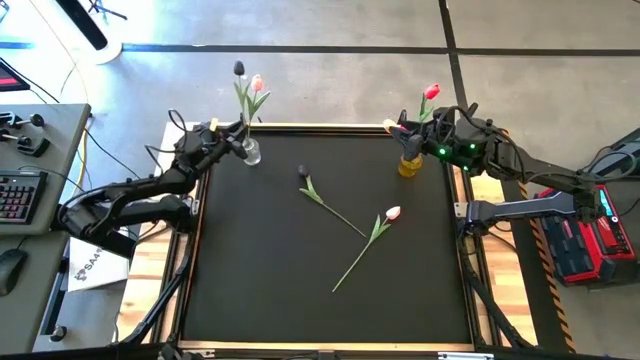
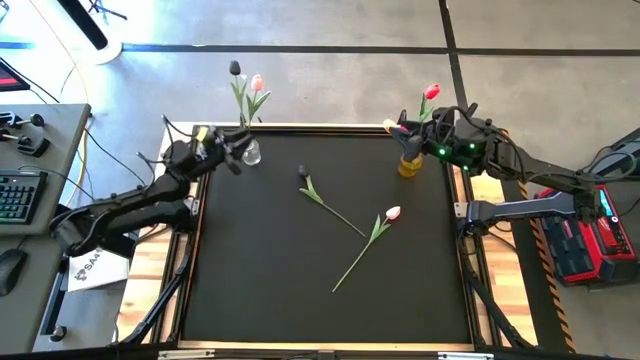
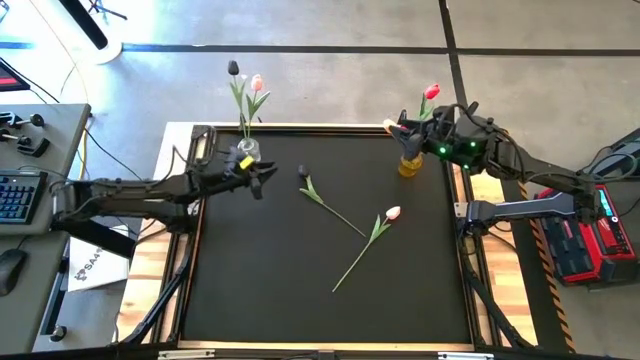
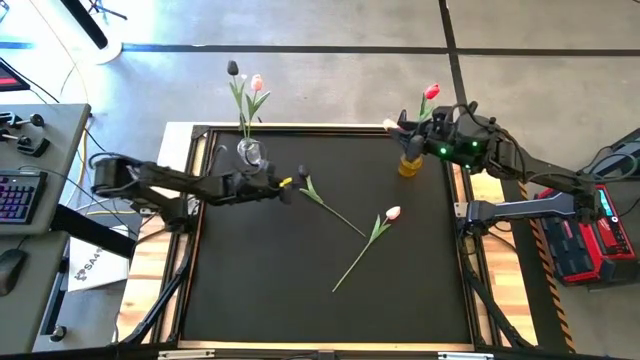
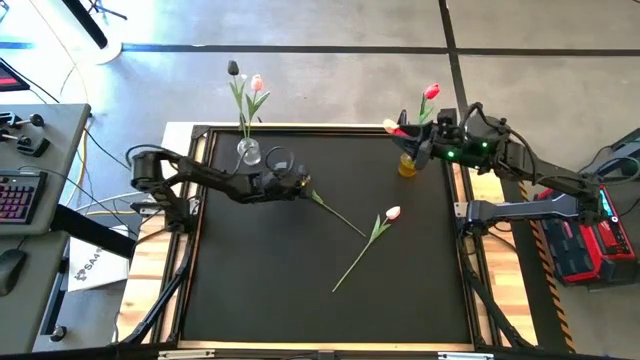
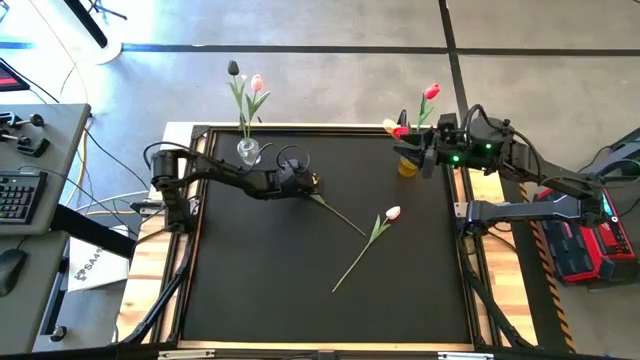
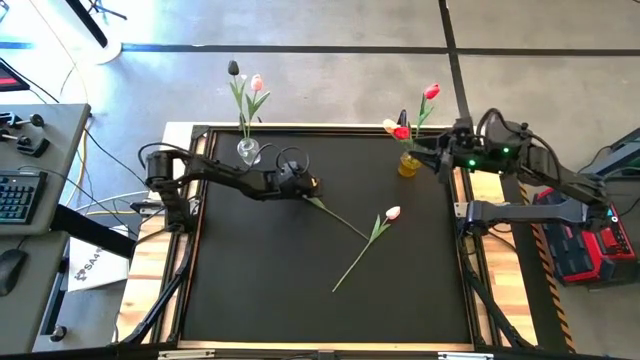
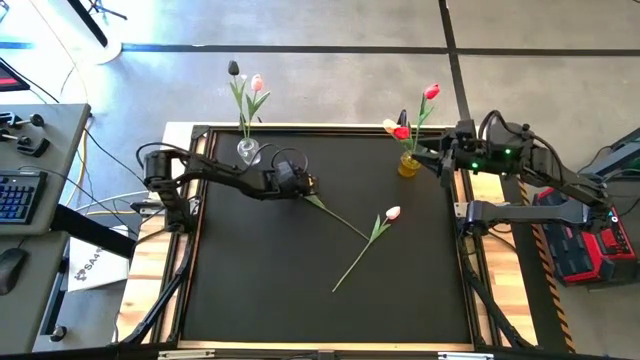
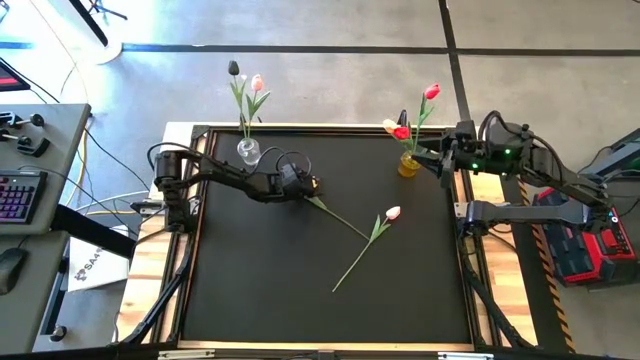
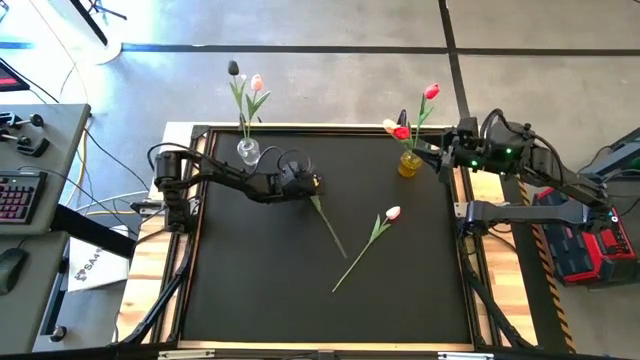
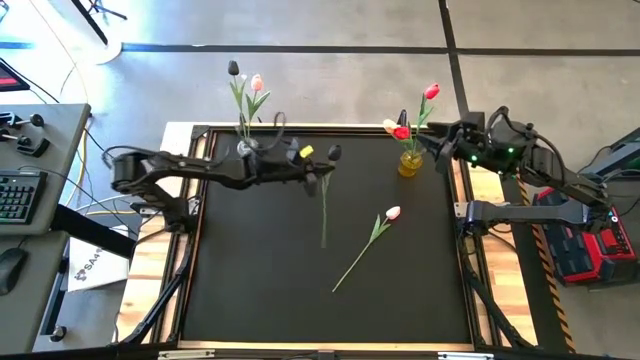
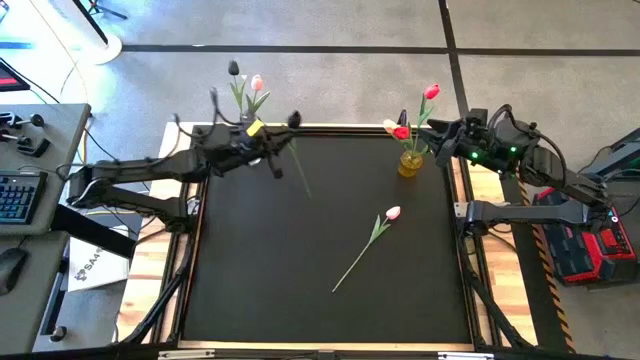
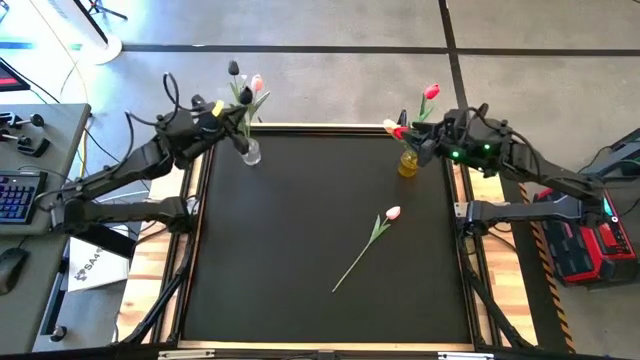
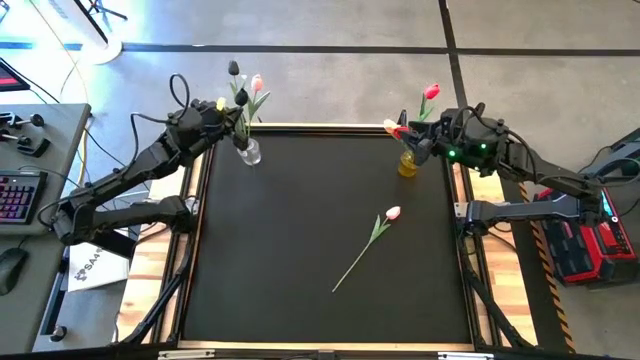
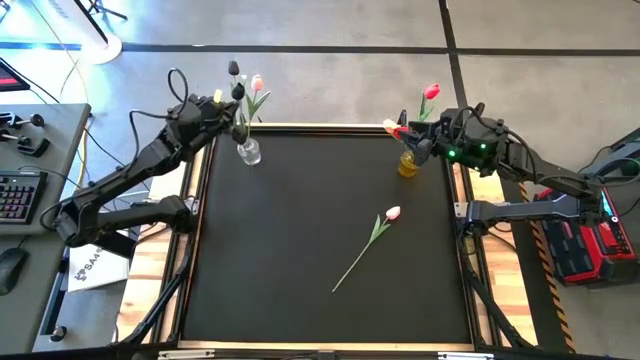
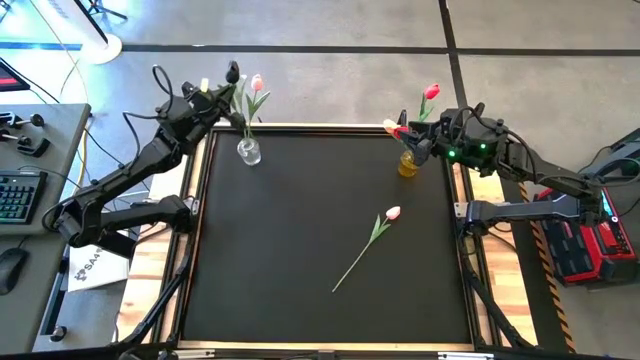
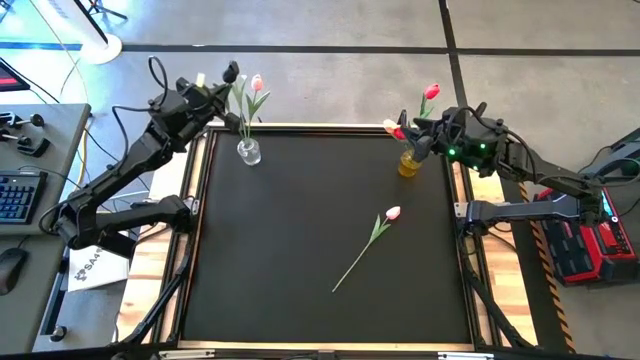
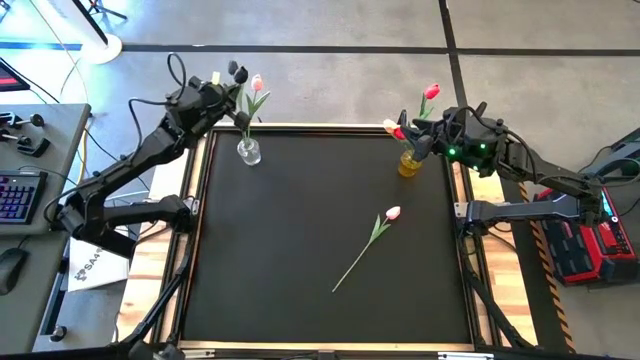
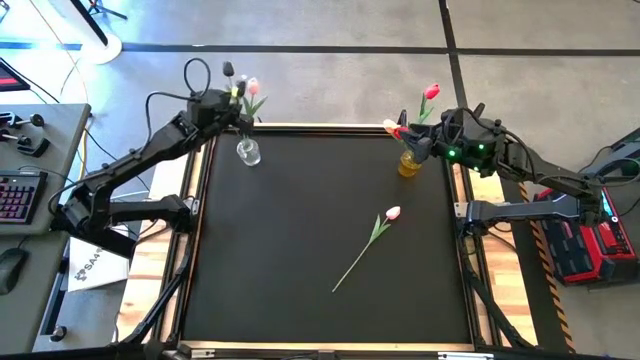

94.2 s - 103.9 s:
Task: Sort flowers into vase by color
Put the black flower into the transparent flower vase

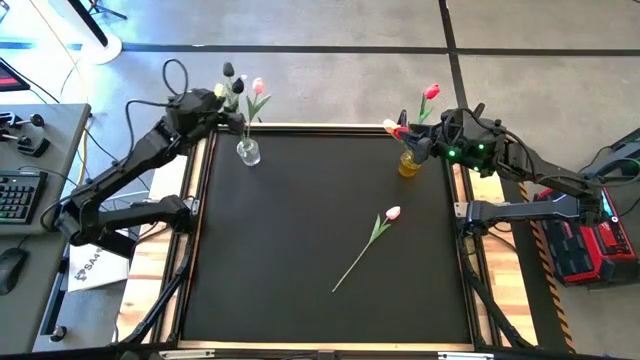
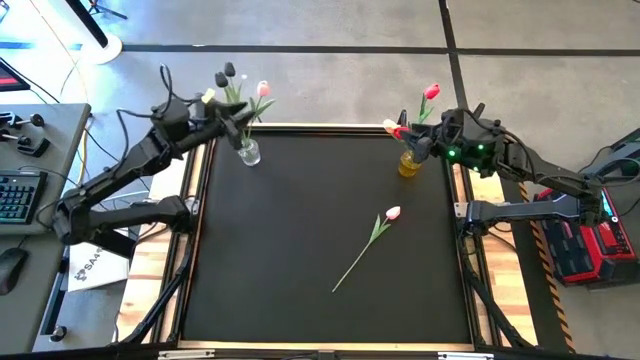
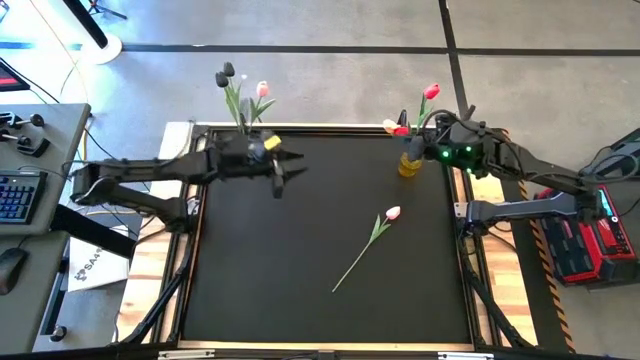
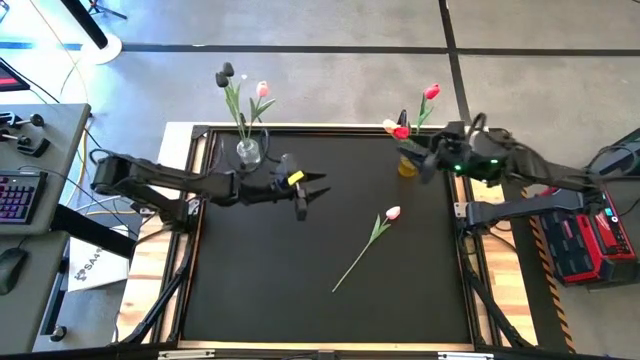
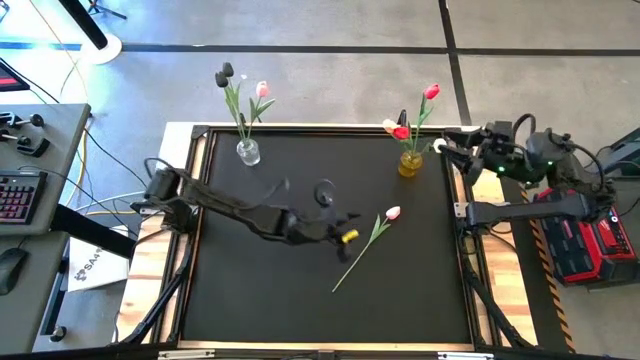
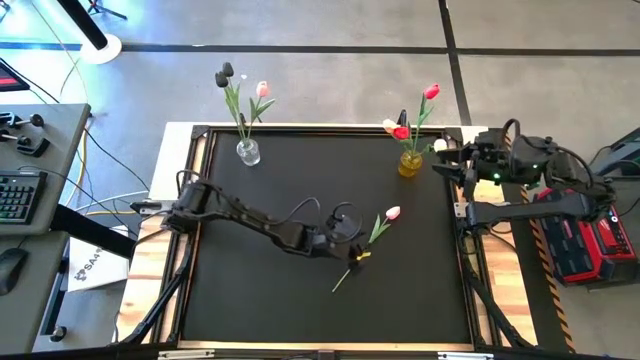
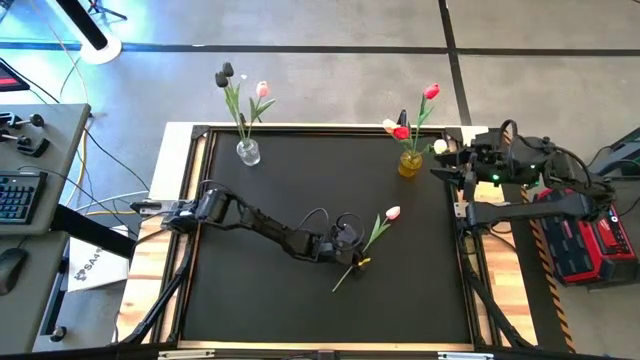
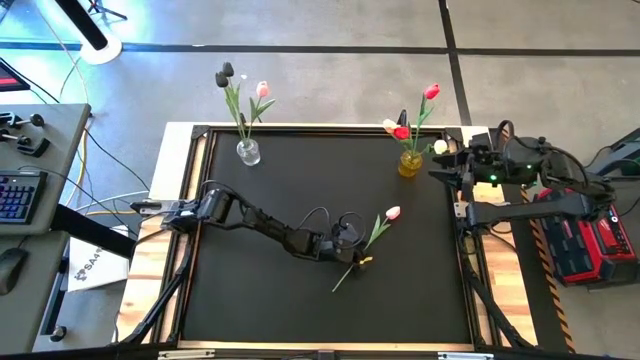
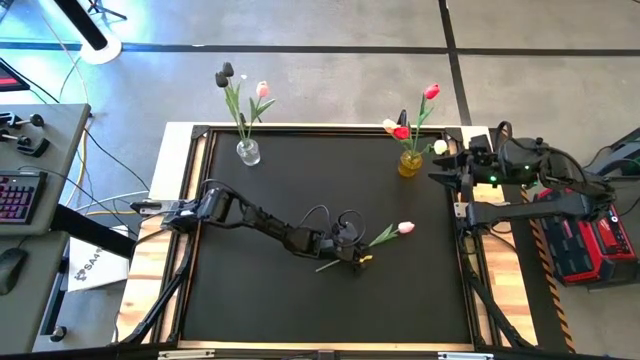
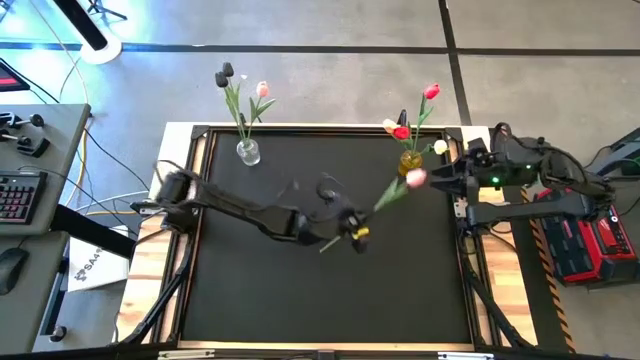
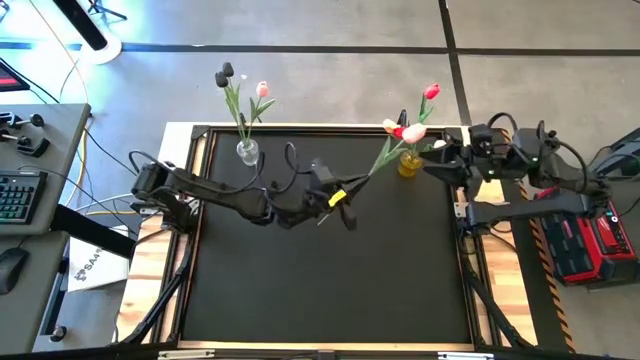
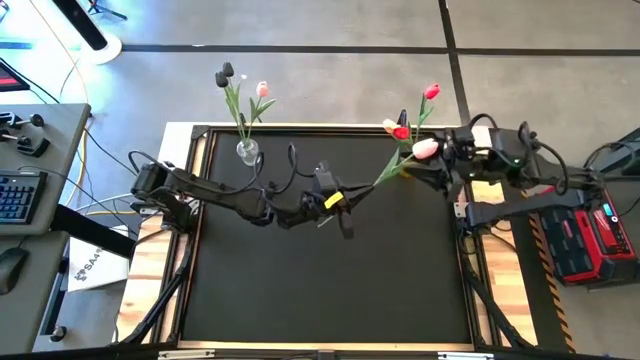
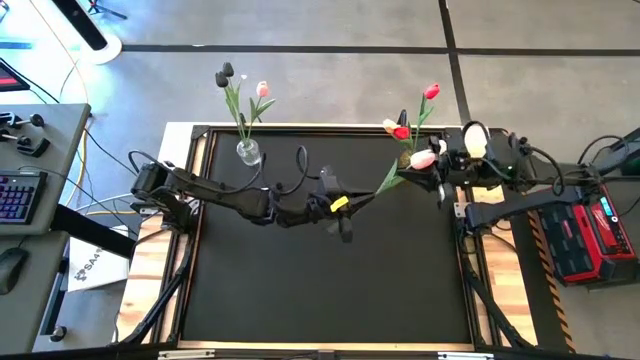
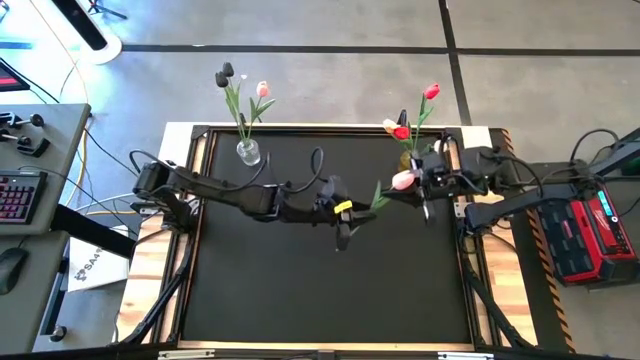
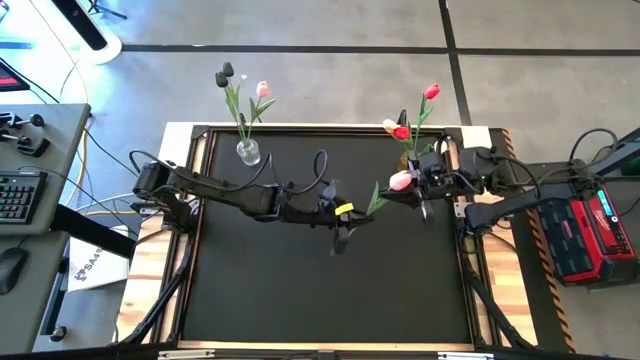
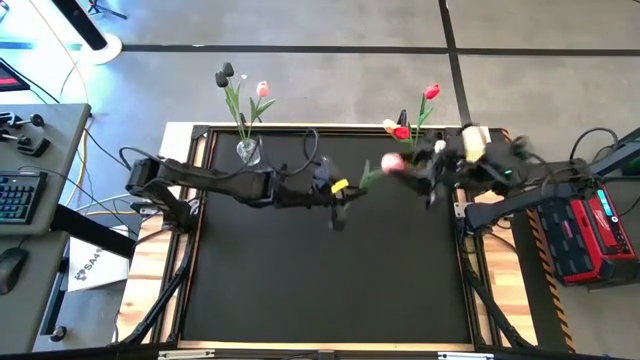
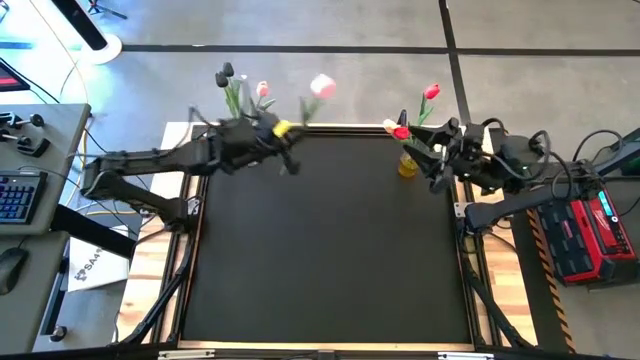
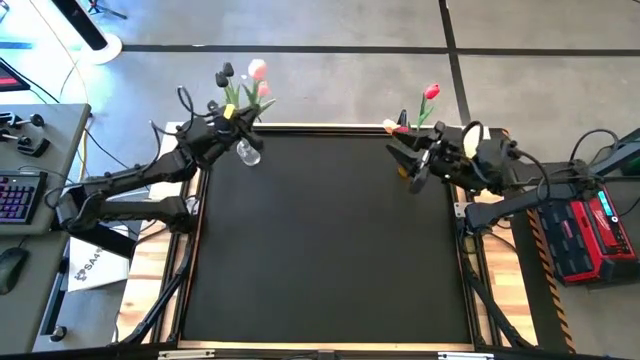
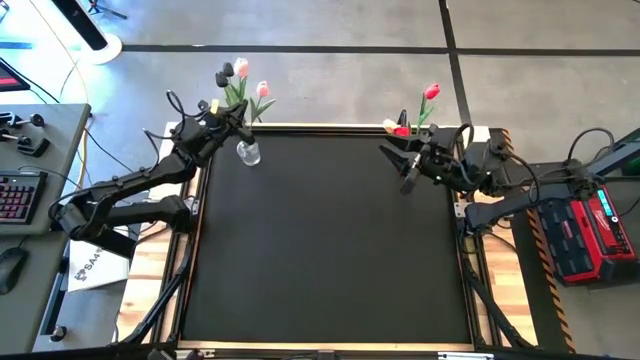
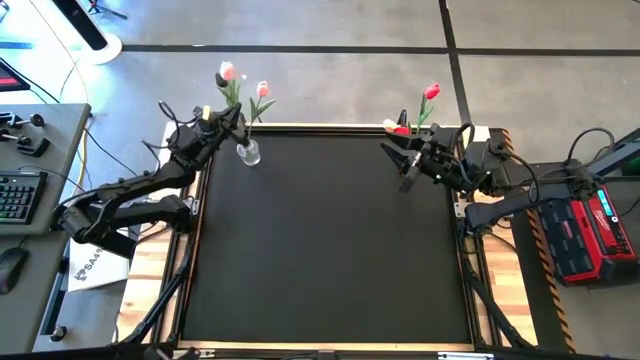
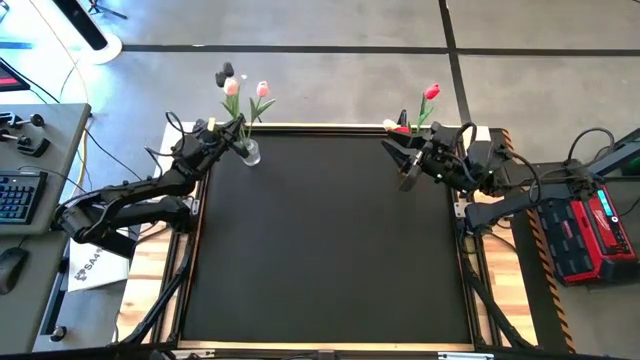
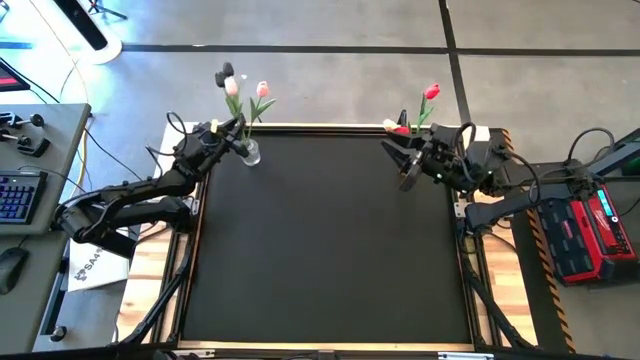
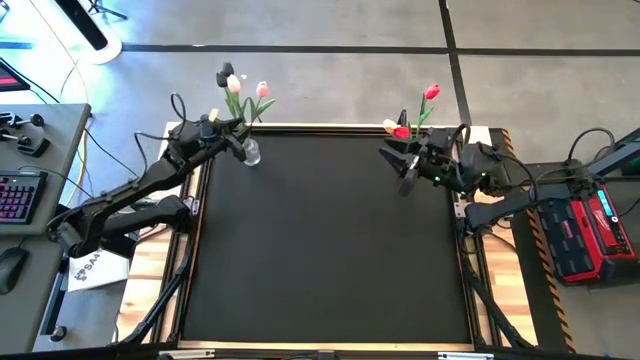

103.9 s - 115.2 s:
Put the pink flower into the transparent flower vase
